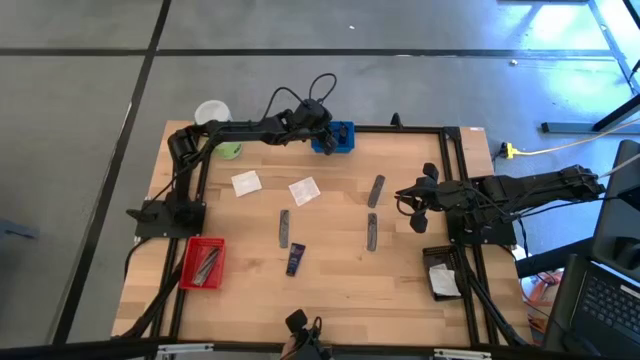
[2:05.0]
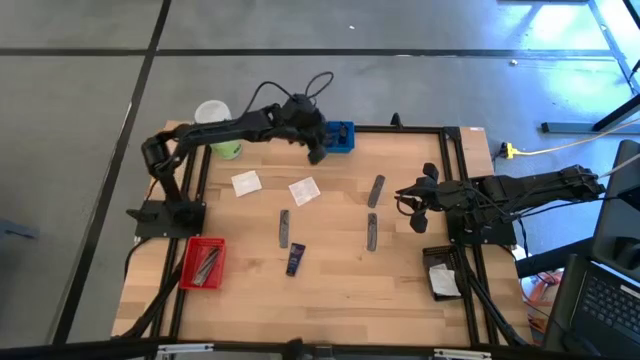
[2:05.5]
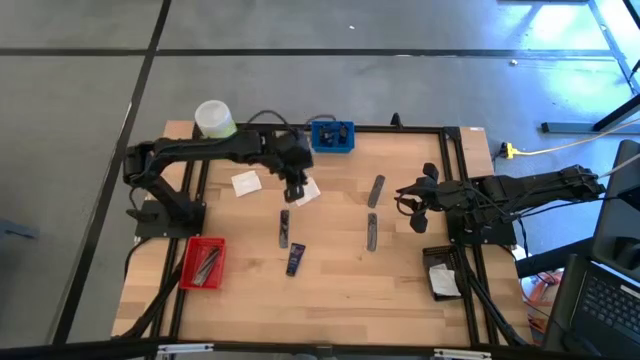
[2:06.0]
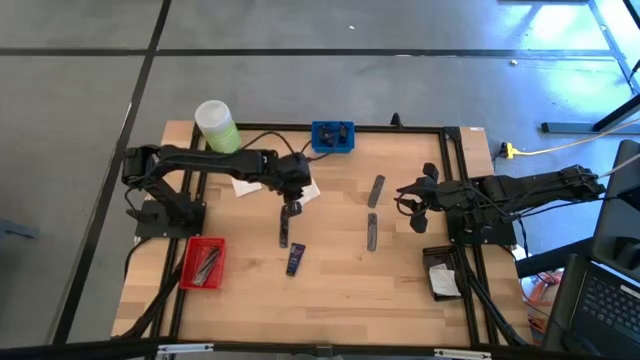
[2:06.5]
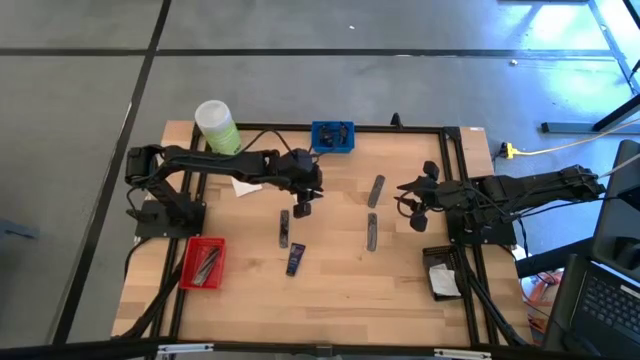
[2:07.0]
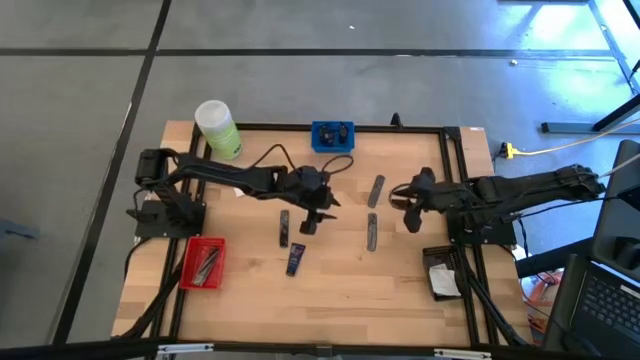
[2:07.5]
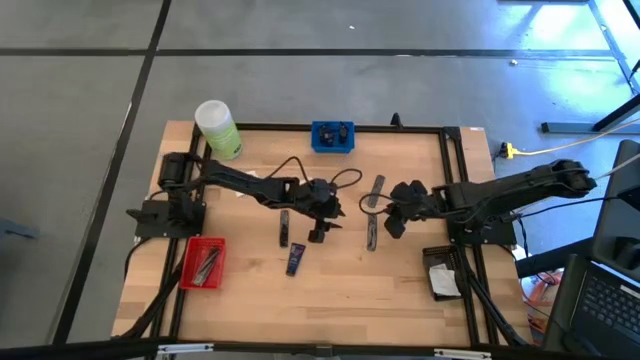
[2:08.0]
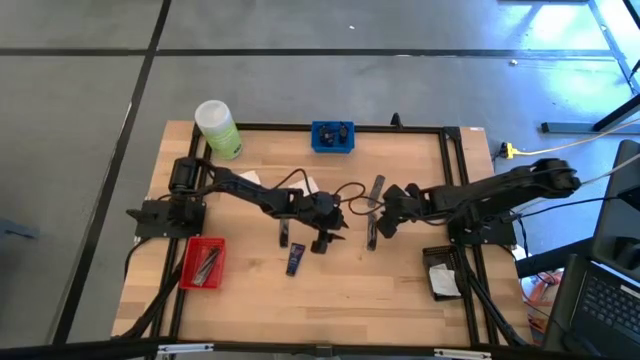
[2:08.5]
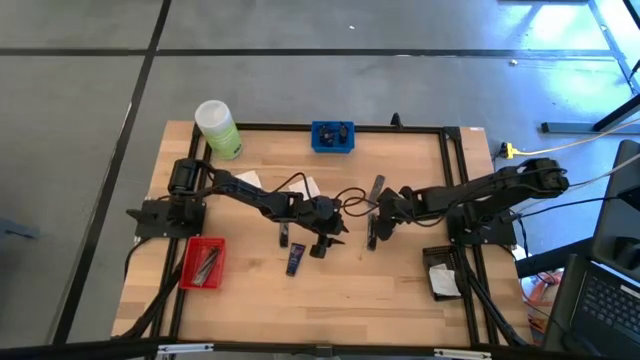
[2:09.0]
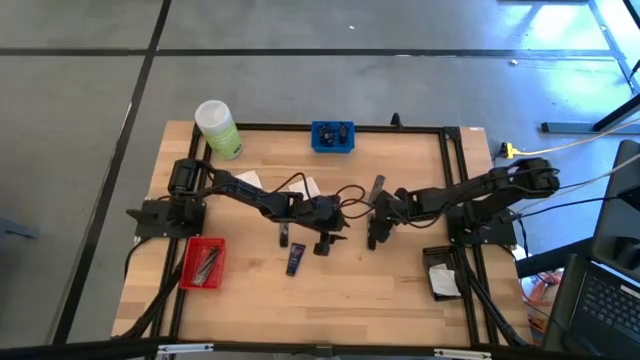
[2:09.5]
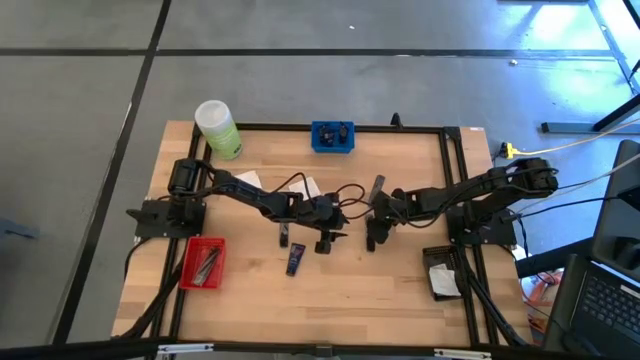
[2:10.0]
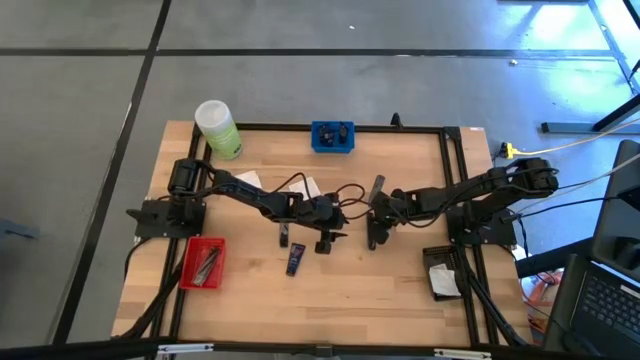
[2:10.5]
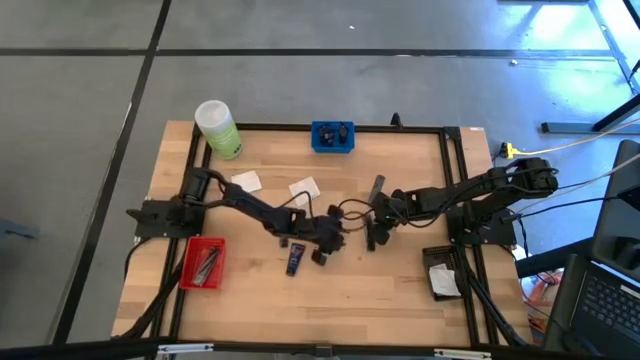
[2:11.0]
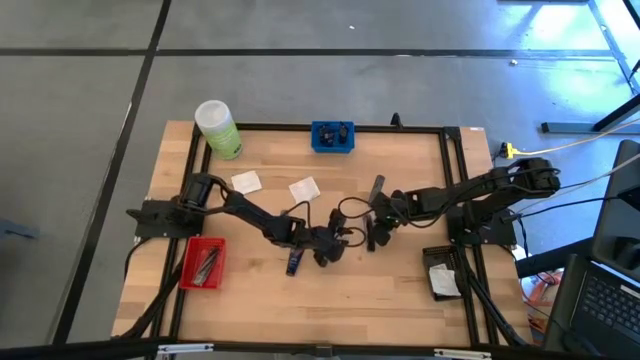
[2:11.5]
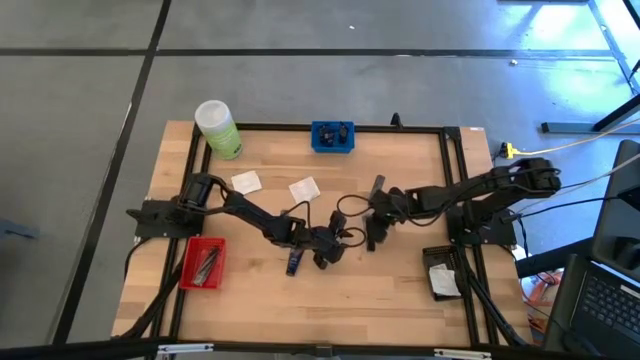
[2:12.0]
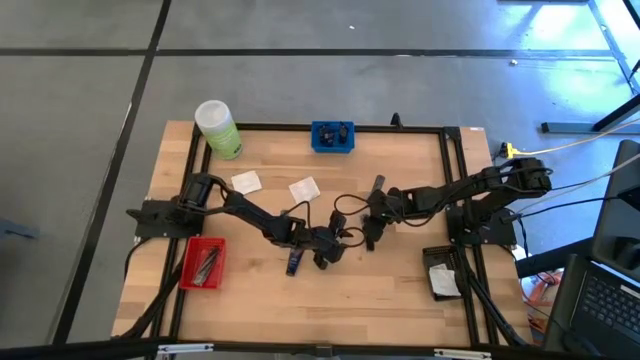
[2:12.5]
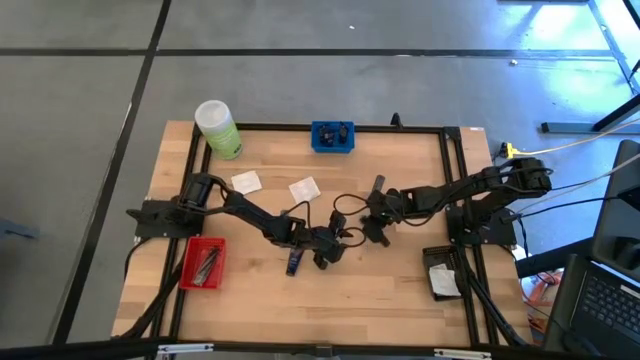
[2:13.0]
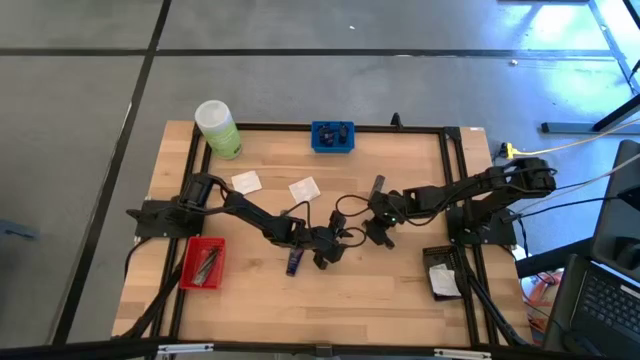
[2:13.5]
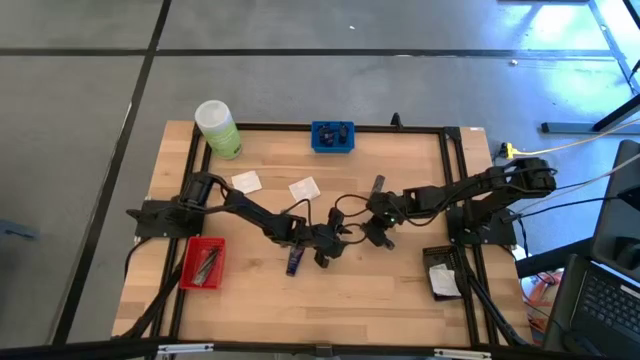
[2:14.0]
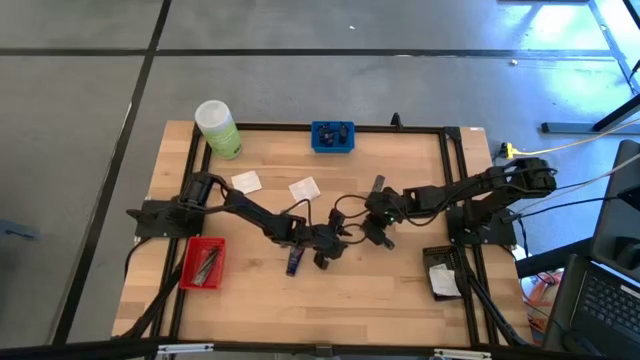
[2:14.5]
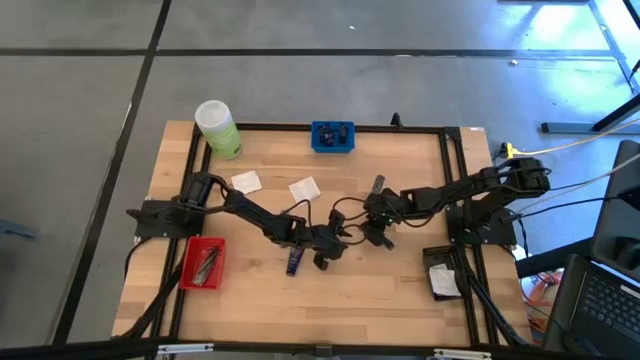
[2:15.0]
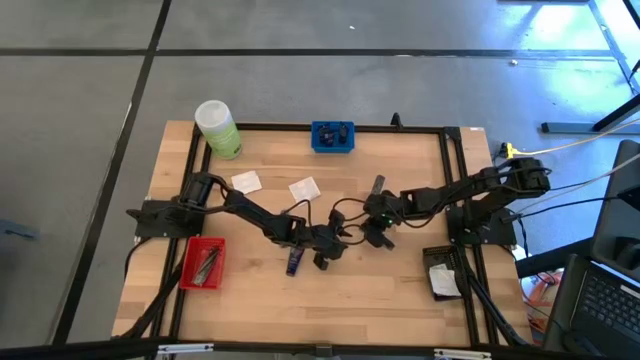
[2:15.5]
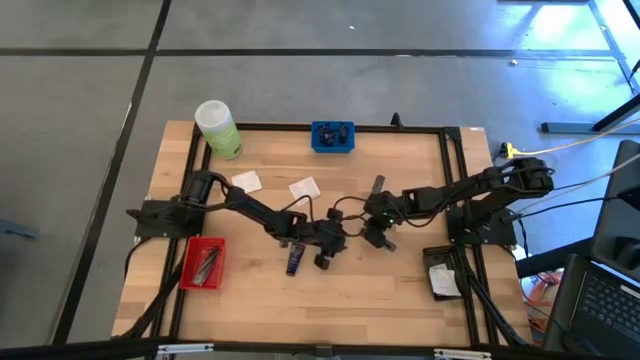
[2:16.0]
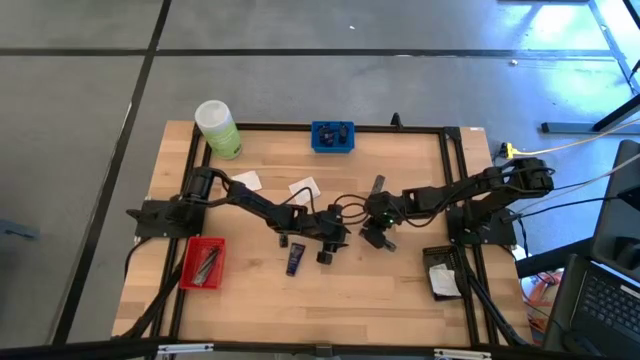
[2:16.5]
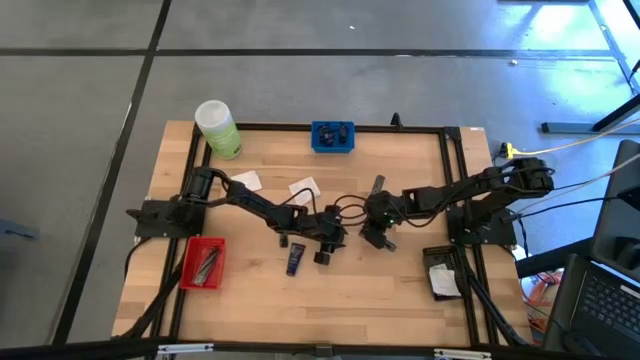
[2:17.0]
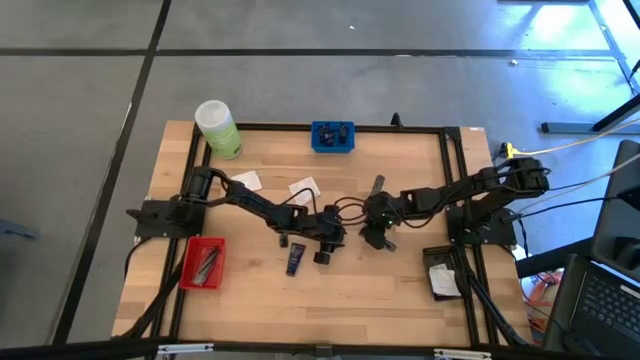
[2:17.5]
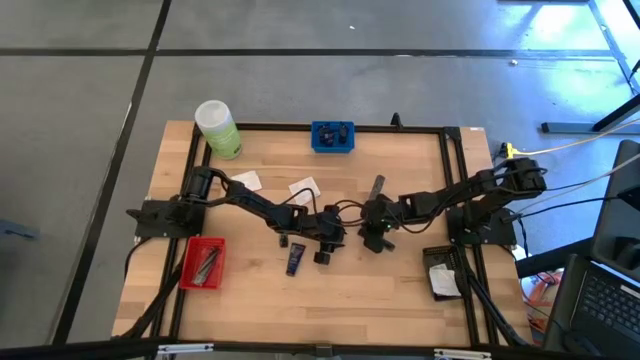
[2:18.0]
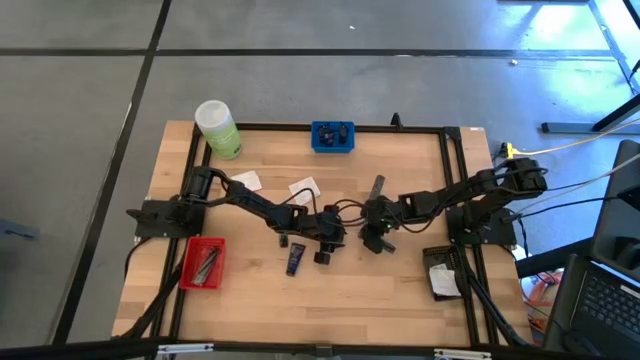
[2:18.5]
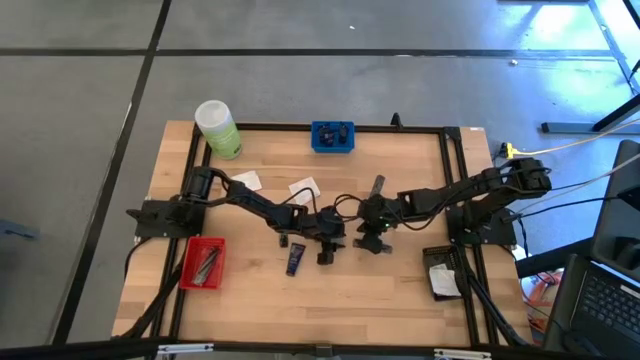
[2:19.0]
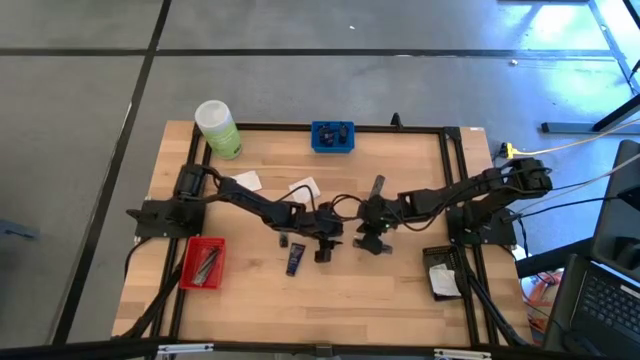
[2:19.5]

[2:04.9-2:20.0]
Task: Pick & Place Travel size toiletries
Put the black hair comb into the red basket
